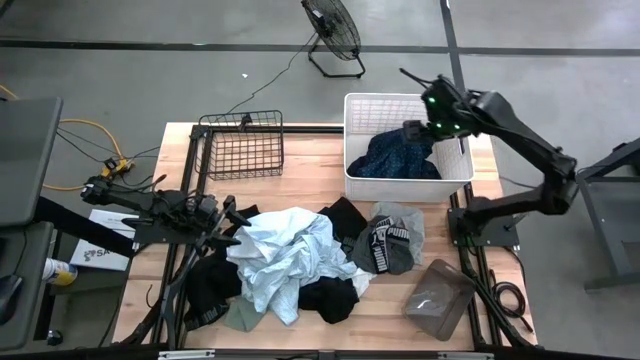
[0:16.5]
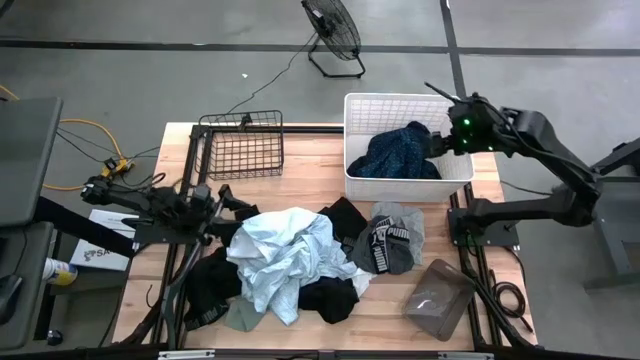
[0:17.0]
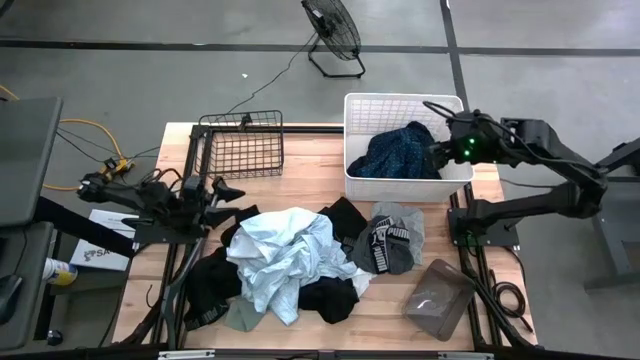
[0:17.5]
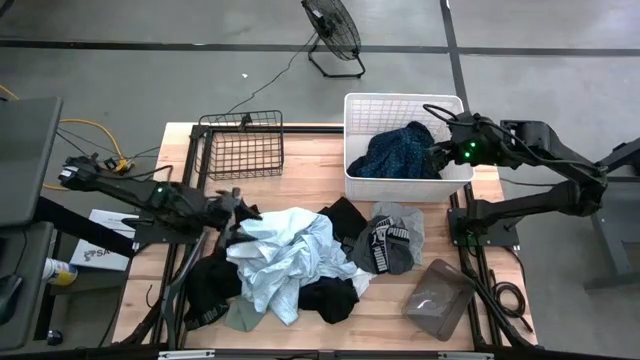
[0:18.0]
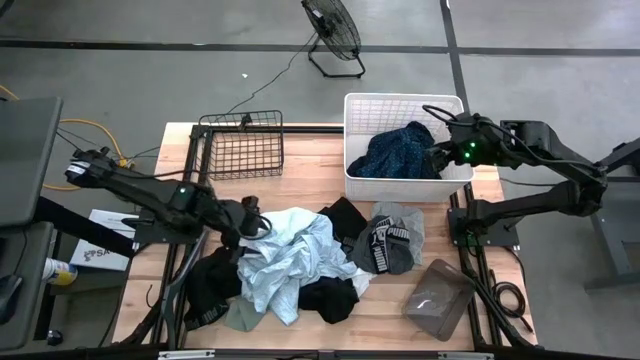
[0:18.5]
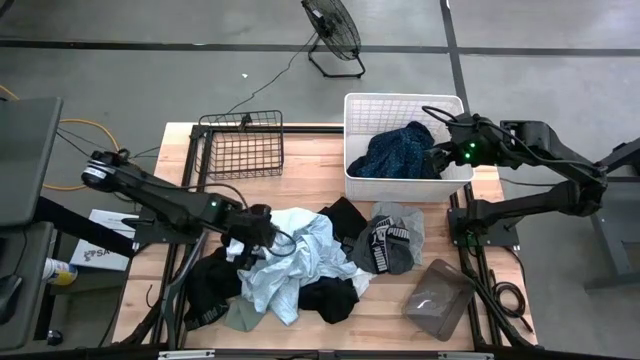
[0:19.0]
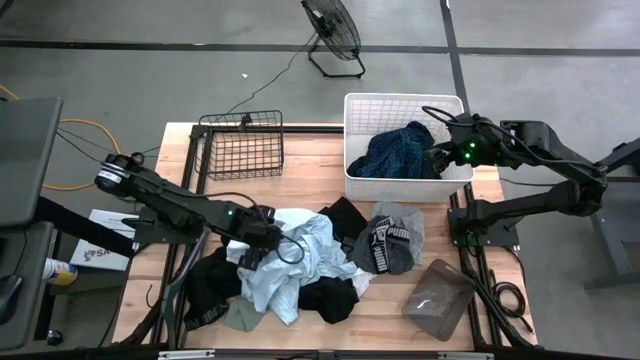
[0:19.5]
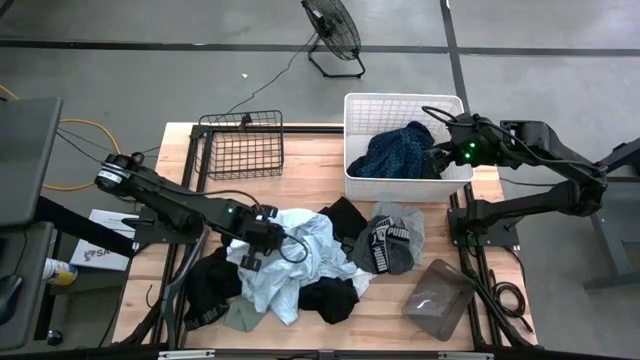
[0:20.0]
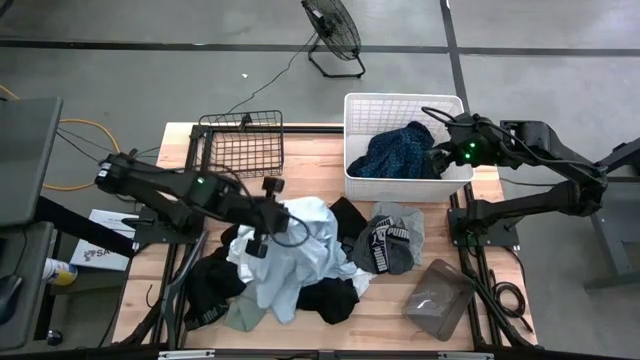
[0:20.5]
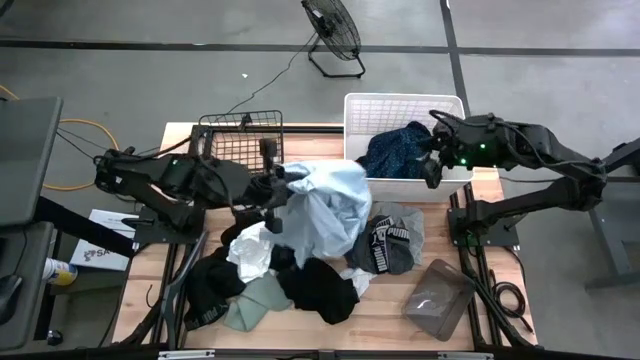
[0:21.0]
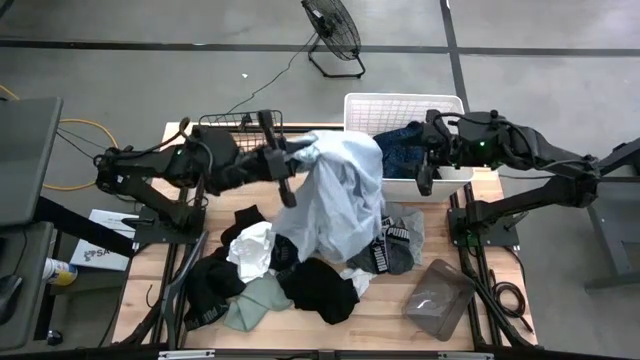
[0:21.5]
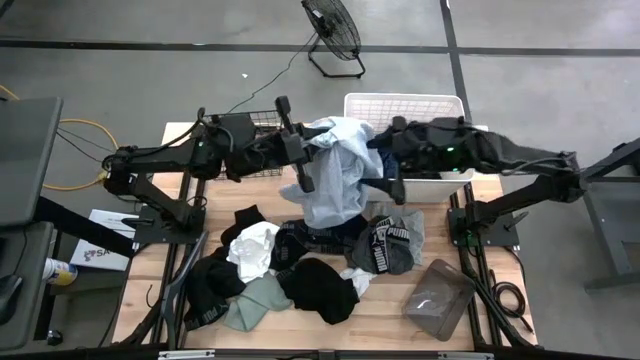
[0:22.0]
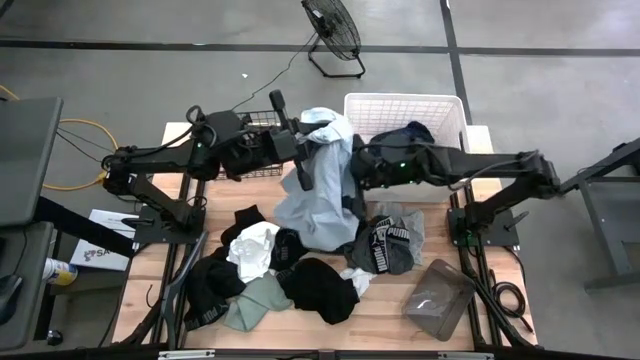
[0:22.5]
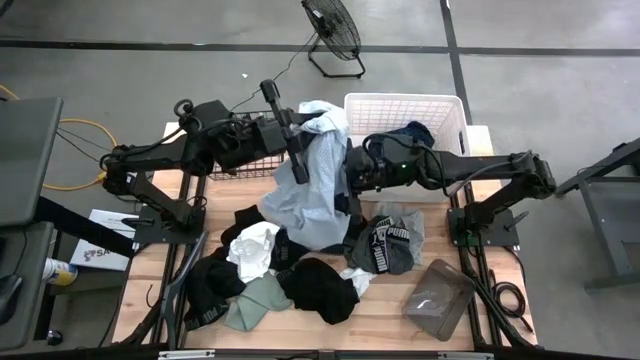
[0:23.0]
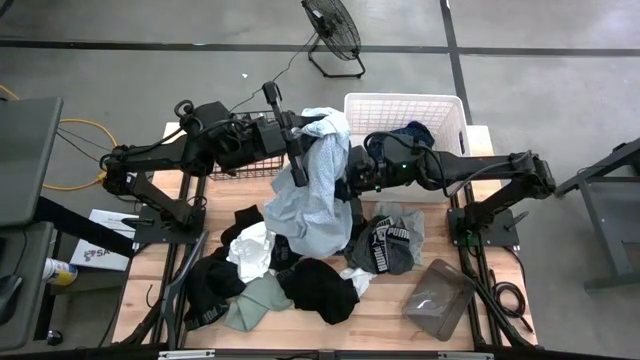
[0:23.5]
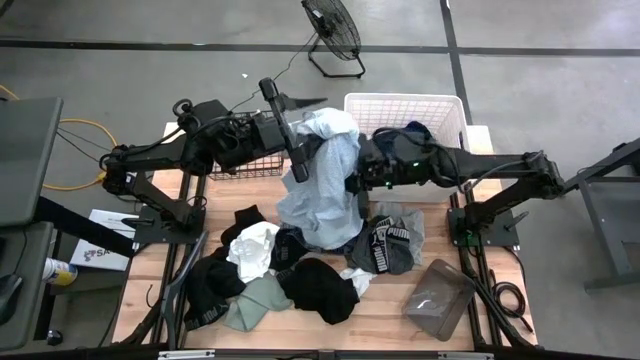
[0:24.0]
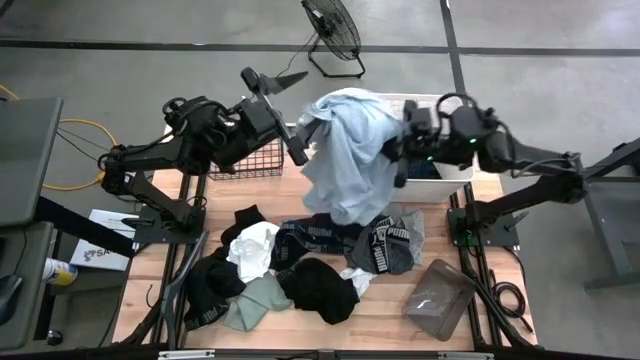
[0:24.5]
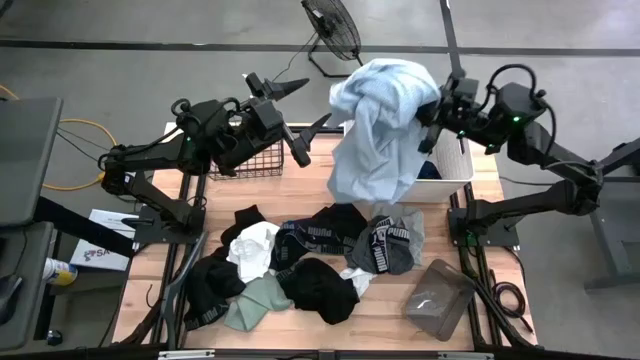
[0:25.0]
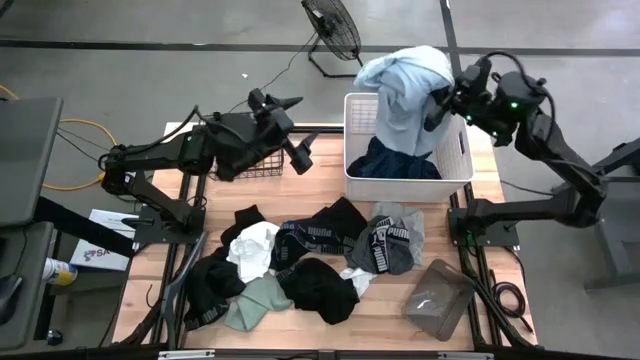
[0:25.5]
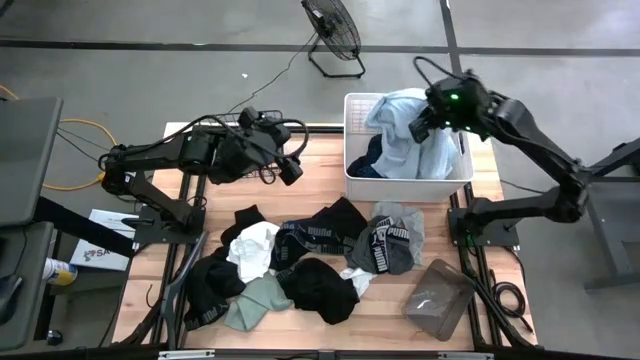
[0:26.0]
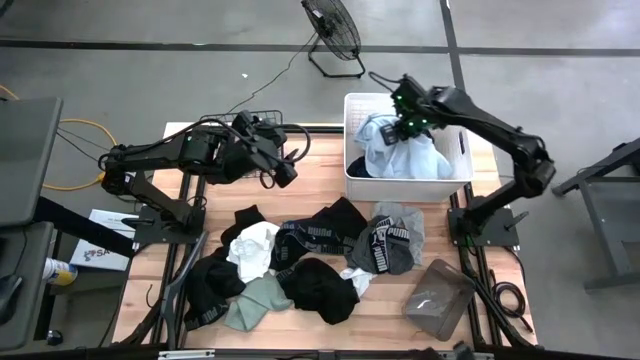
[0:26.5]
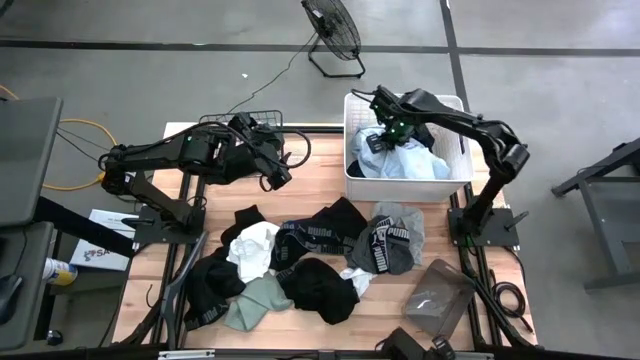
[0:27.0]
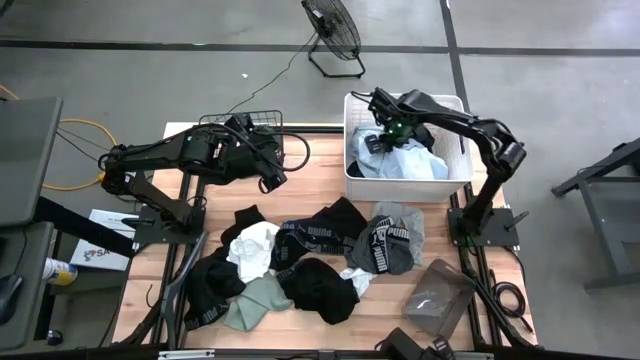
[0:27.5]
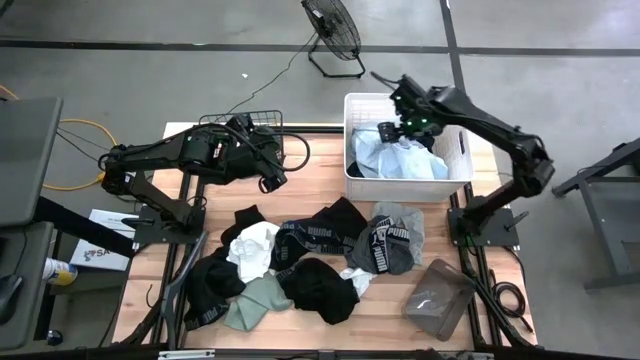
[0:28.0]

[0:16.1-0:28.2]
Task: Pick & Place Cloths
Put the white patterned shirt into the white bin

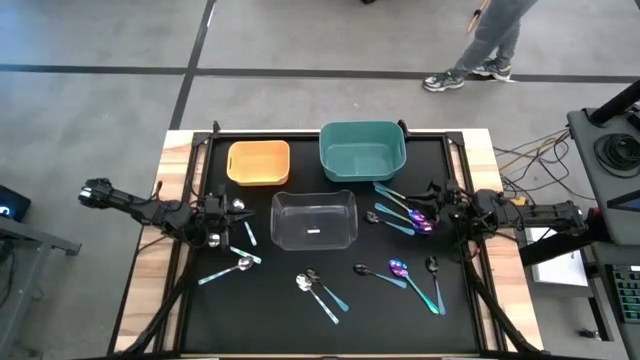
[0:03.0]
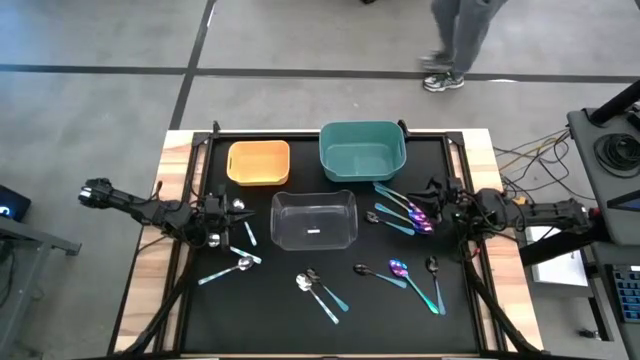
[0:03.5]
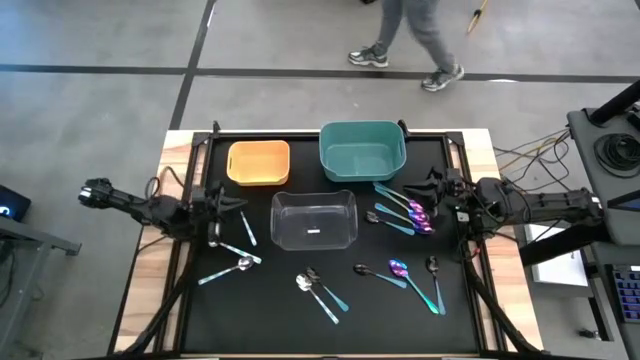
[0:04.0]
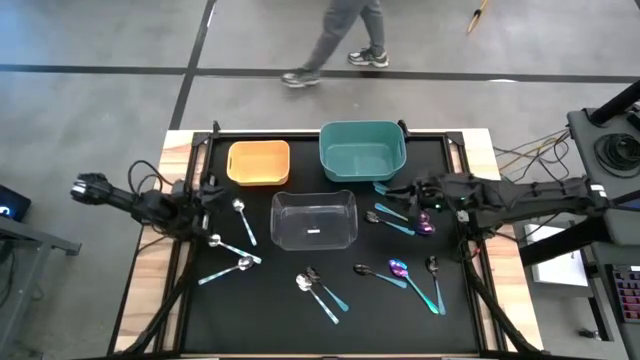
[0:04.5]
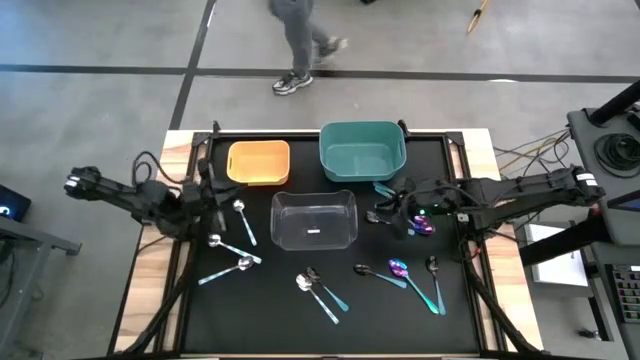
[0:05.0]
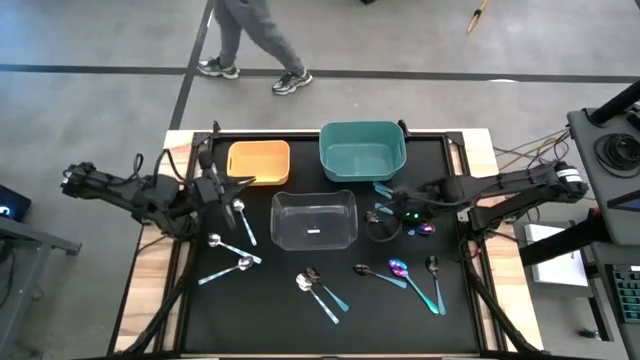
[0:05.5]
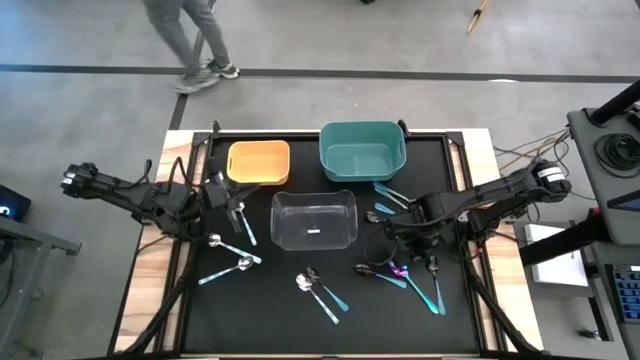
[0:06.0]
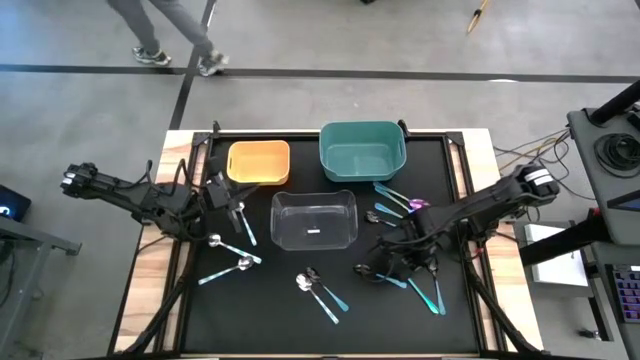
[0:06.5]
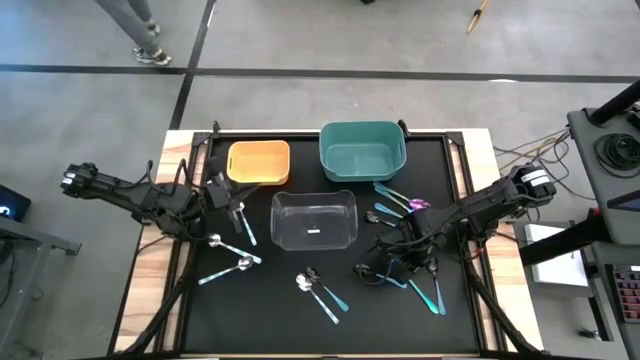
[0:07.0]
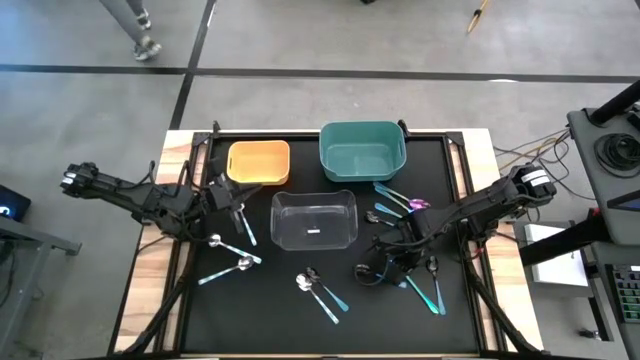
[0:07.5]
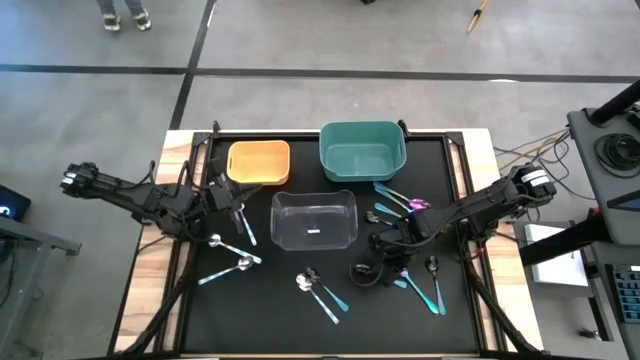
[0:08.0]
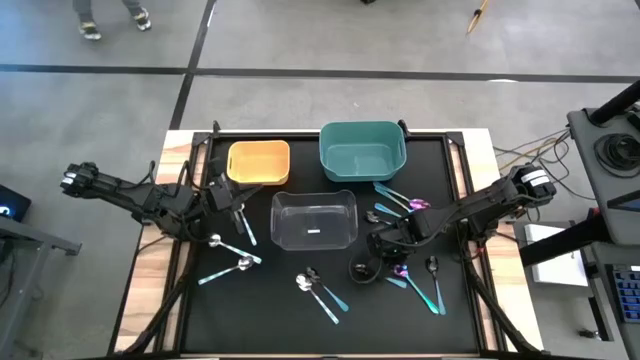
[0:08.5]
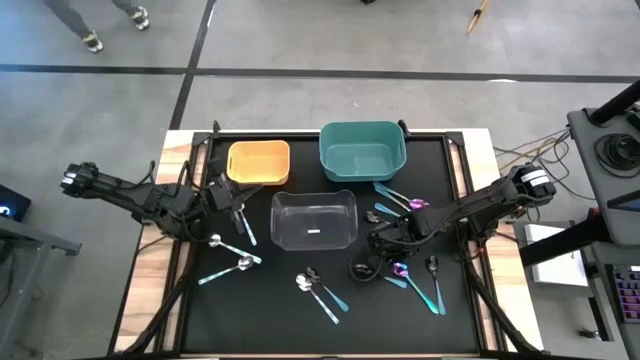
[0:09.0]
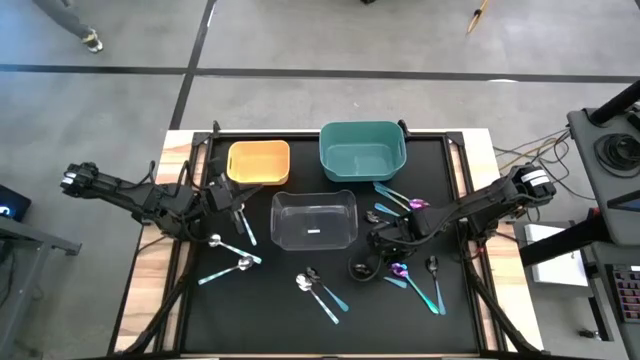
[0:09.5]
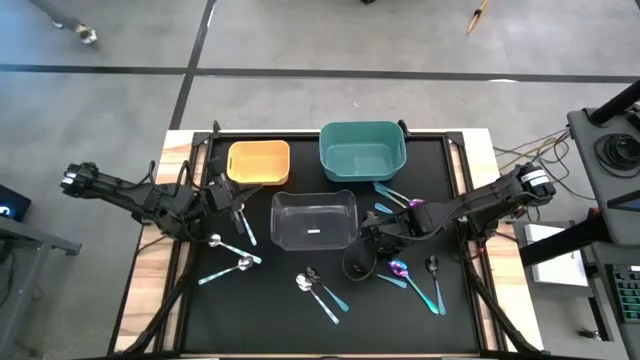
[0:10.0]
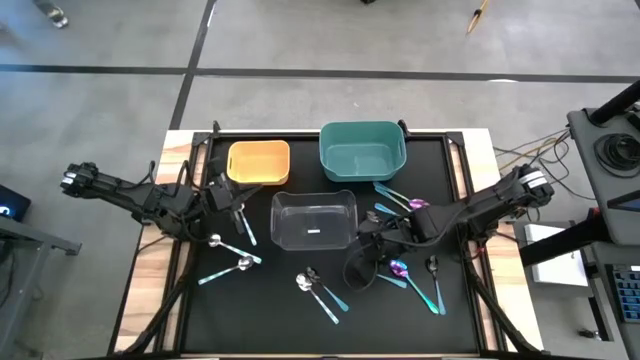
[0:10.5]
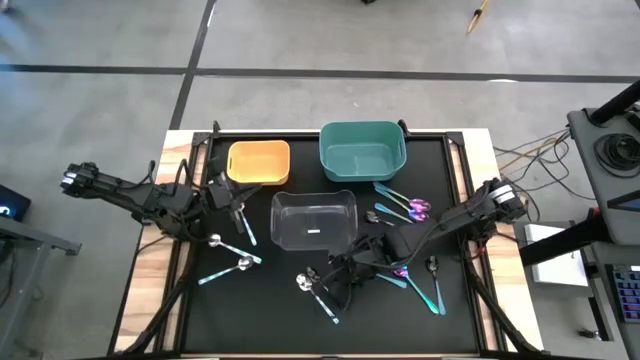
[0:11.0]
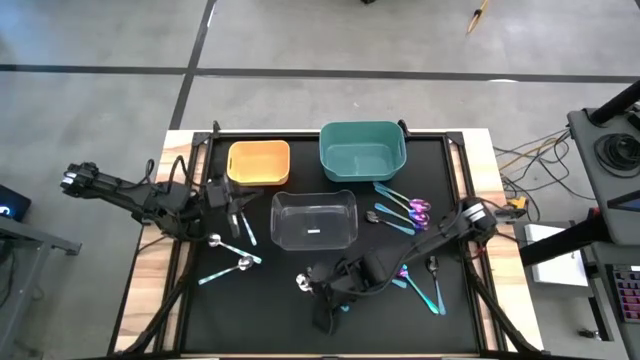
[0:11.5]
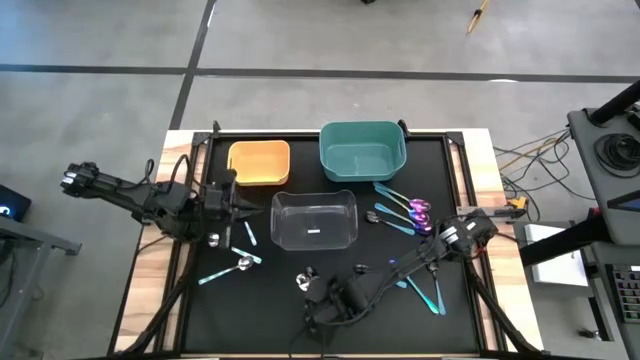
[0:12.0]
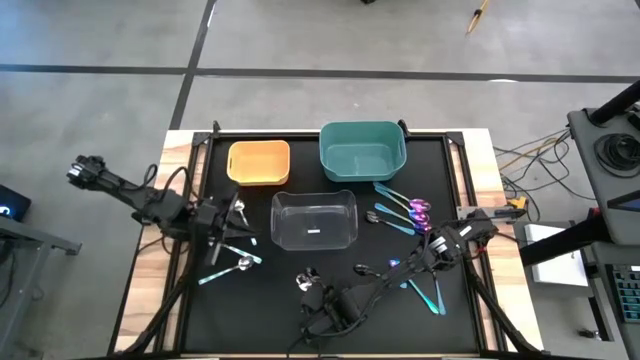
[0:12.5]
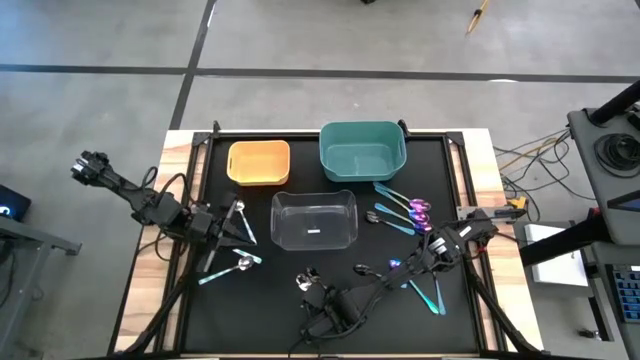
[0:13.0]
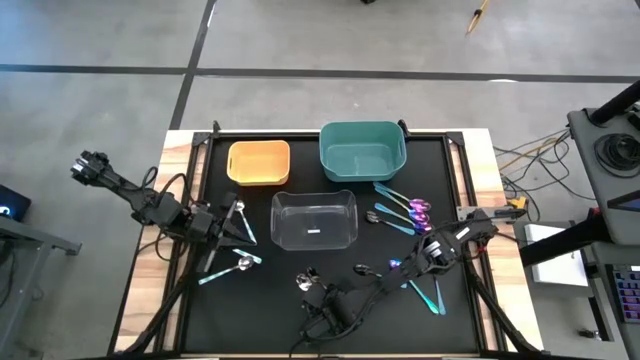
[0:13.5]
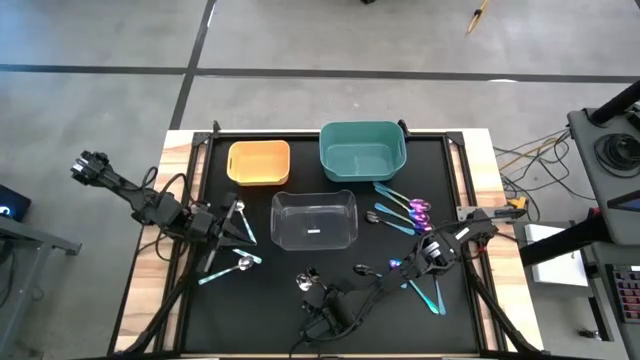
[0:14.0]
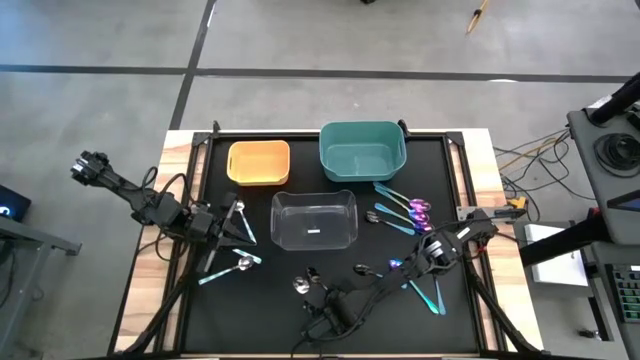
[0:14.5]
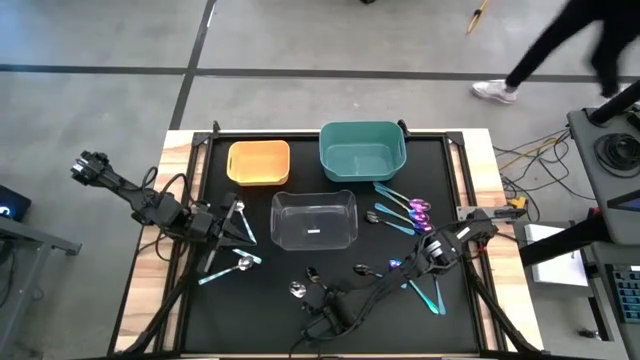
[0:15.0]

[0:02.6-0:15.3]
Task: Sort silverware by color (type)
Put the blue patterned spoon into the green bin
